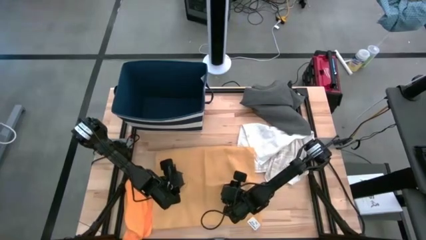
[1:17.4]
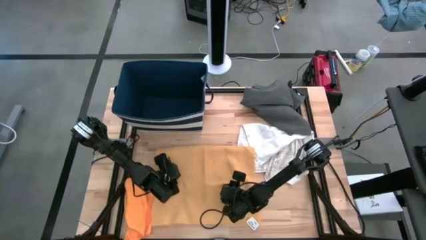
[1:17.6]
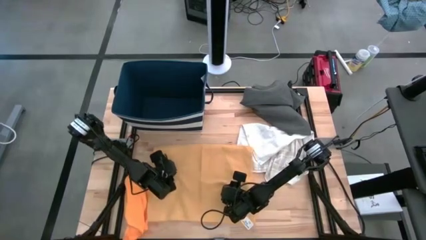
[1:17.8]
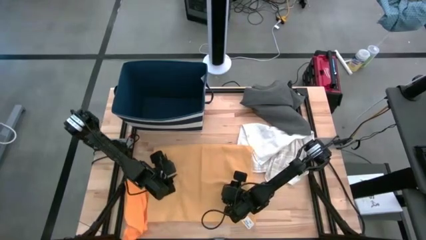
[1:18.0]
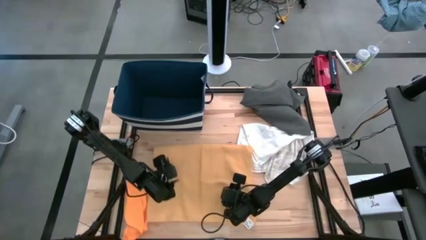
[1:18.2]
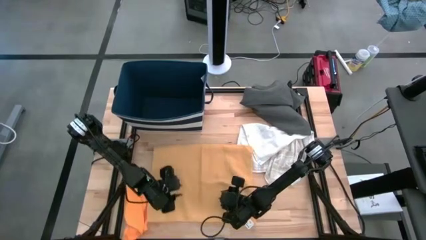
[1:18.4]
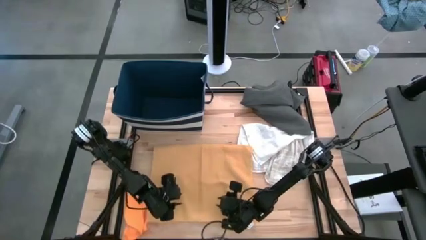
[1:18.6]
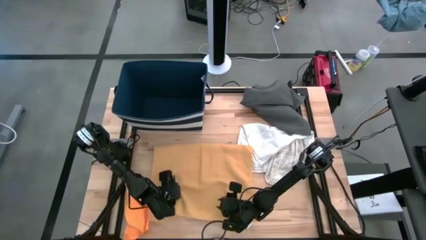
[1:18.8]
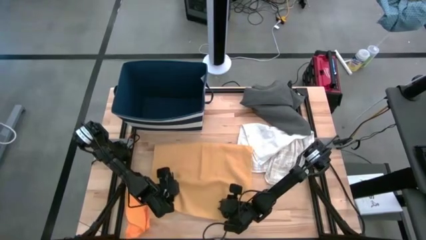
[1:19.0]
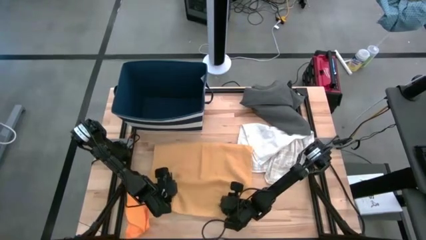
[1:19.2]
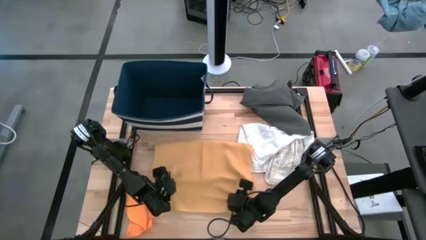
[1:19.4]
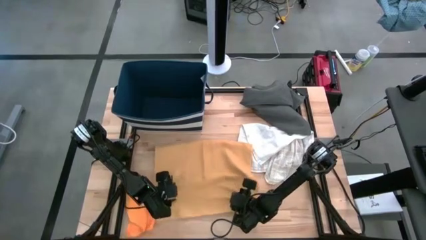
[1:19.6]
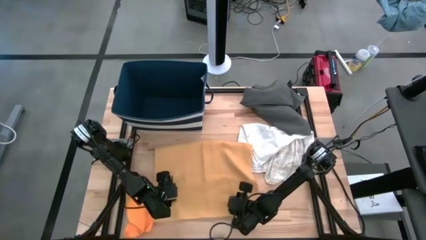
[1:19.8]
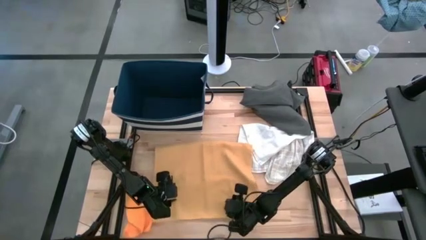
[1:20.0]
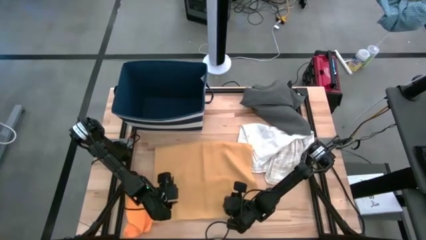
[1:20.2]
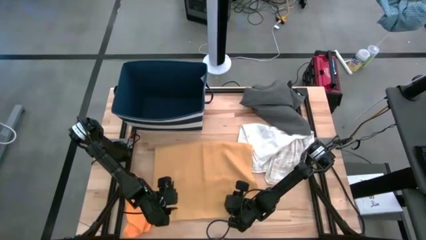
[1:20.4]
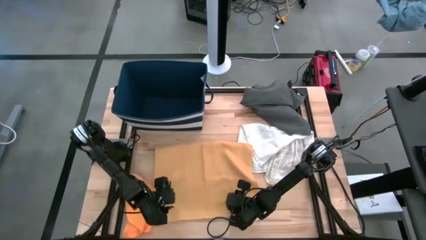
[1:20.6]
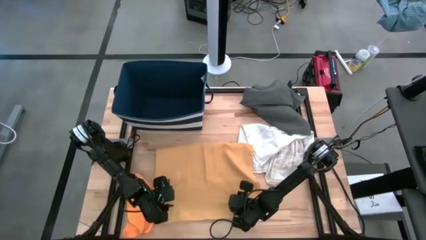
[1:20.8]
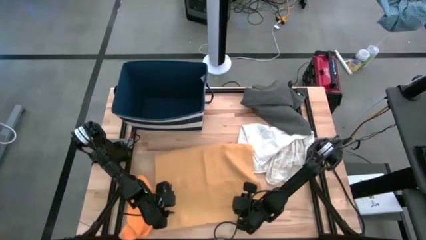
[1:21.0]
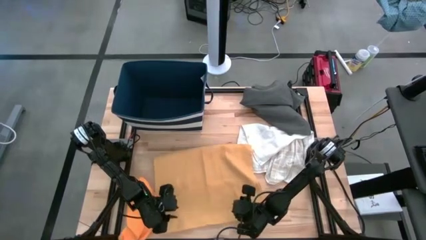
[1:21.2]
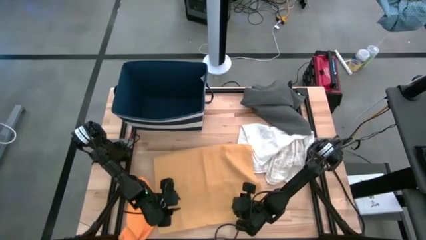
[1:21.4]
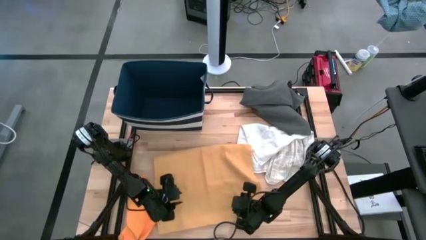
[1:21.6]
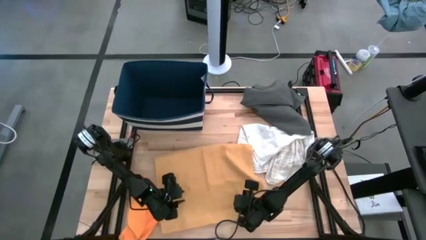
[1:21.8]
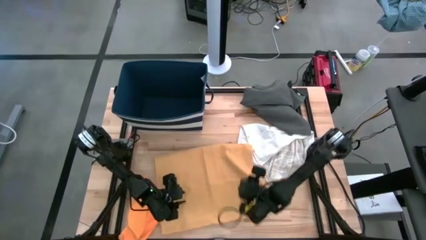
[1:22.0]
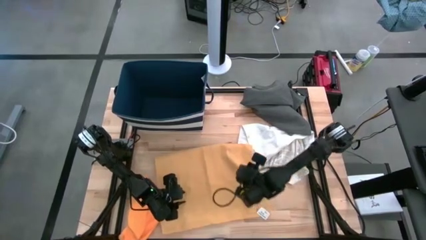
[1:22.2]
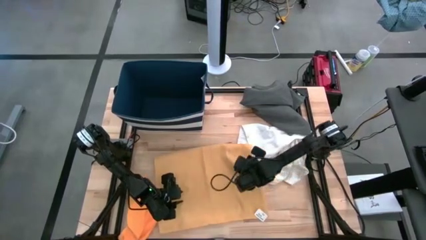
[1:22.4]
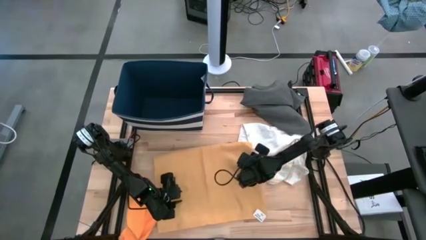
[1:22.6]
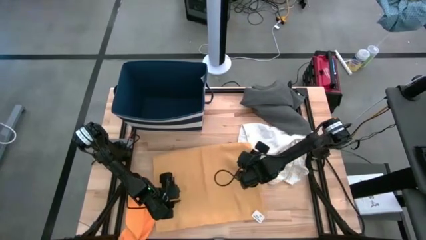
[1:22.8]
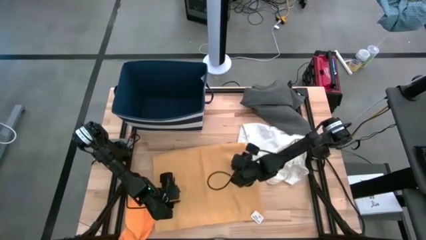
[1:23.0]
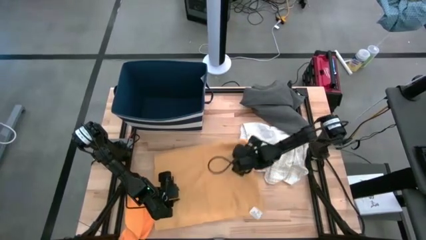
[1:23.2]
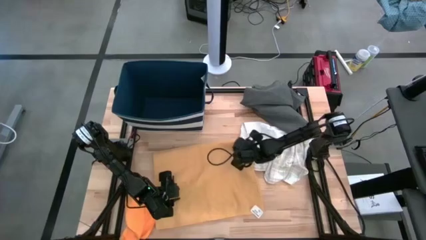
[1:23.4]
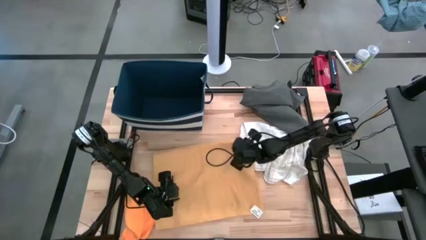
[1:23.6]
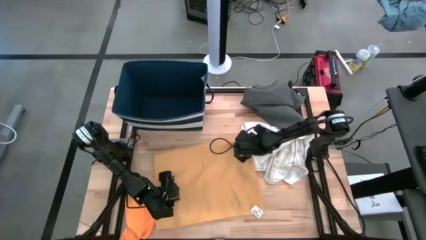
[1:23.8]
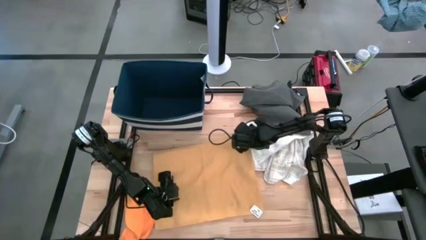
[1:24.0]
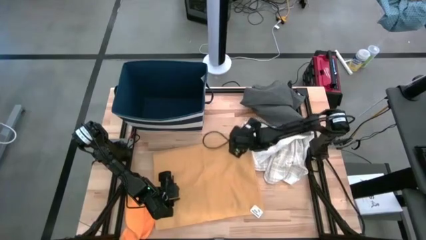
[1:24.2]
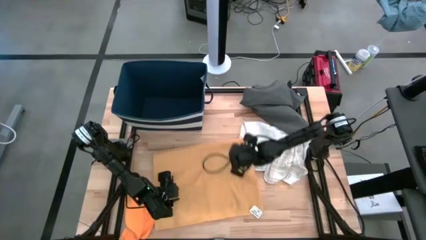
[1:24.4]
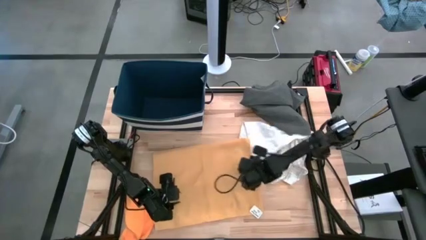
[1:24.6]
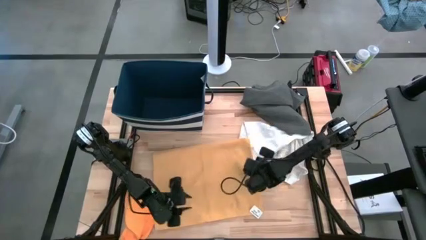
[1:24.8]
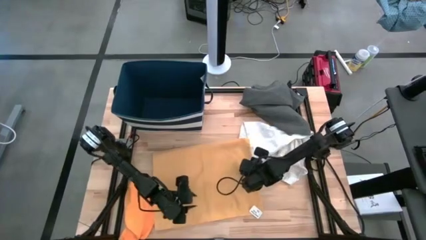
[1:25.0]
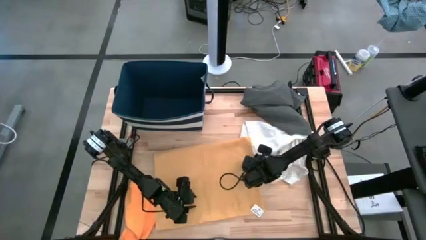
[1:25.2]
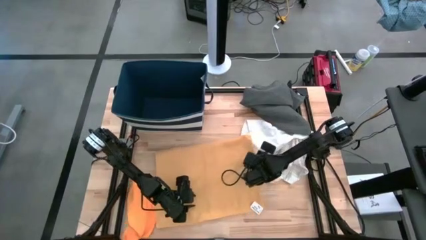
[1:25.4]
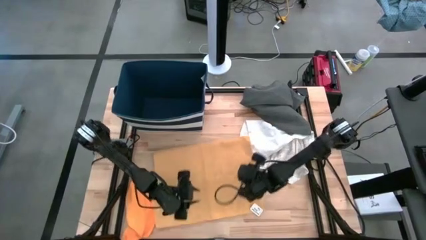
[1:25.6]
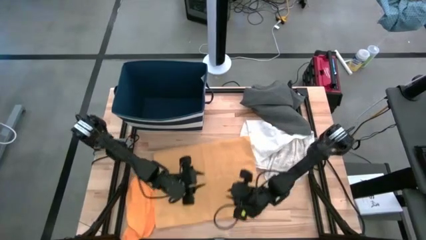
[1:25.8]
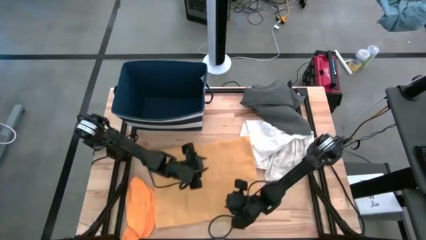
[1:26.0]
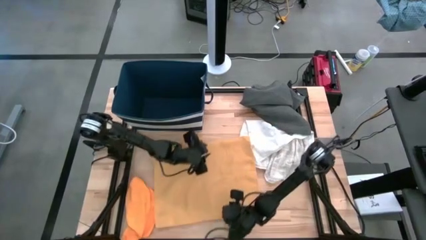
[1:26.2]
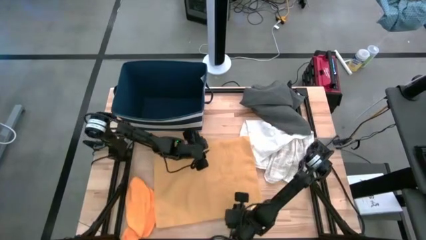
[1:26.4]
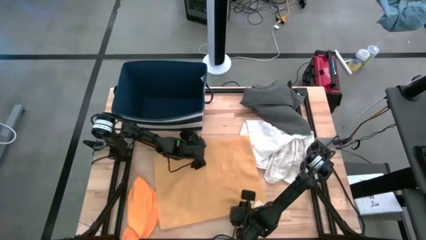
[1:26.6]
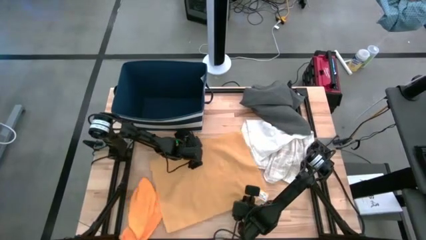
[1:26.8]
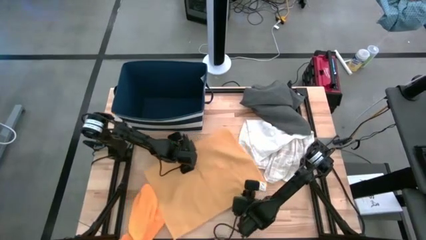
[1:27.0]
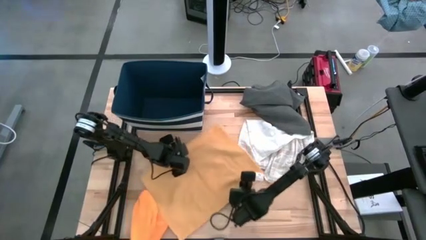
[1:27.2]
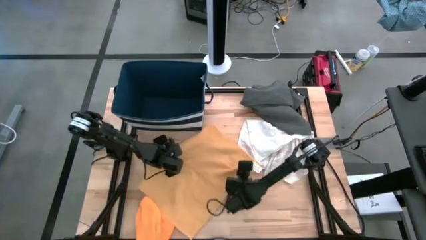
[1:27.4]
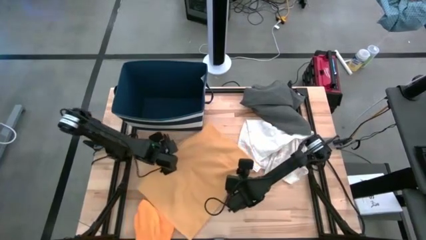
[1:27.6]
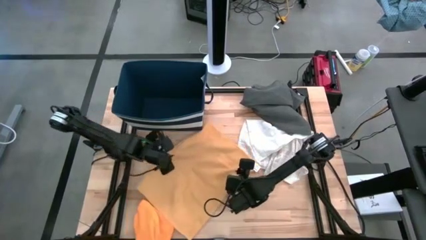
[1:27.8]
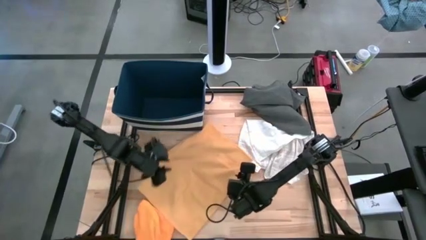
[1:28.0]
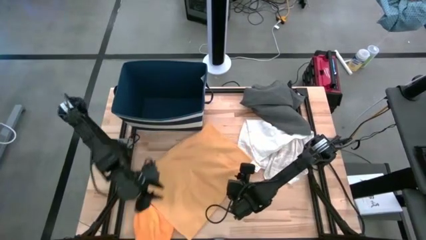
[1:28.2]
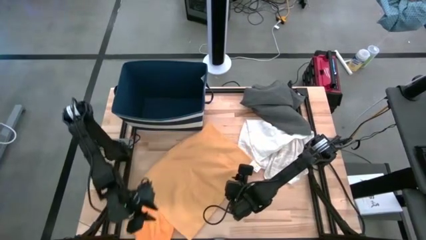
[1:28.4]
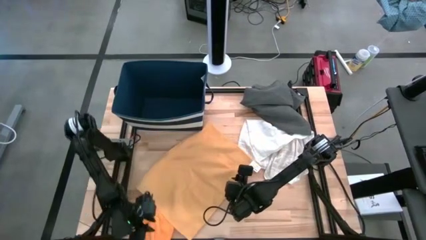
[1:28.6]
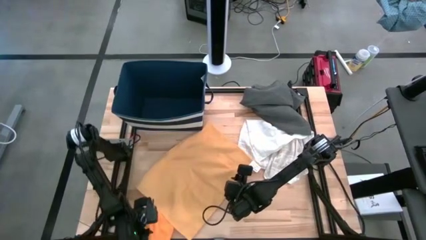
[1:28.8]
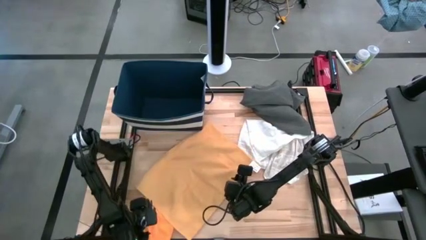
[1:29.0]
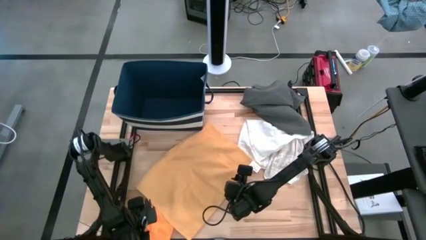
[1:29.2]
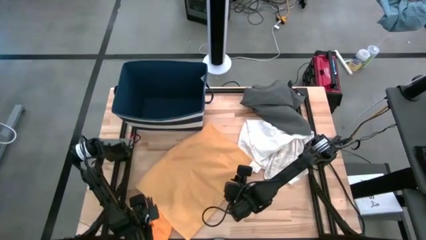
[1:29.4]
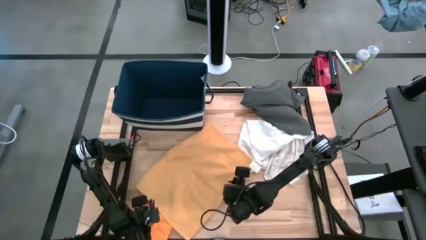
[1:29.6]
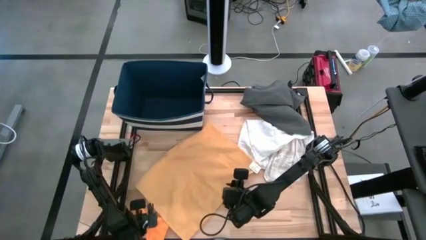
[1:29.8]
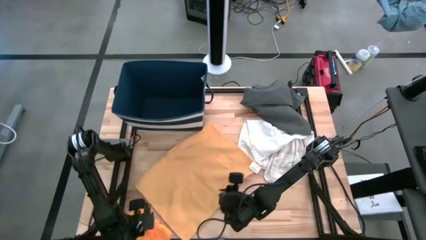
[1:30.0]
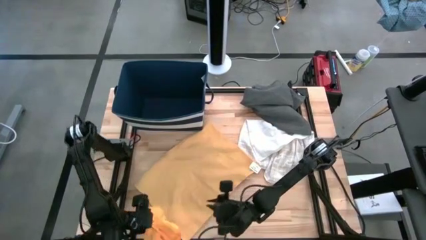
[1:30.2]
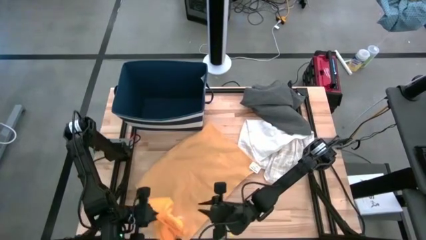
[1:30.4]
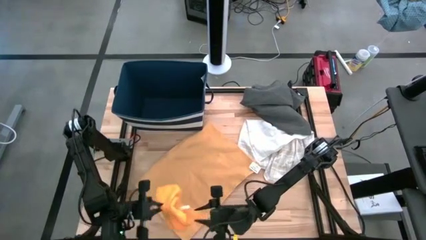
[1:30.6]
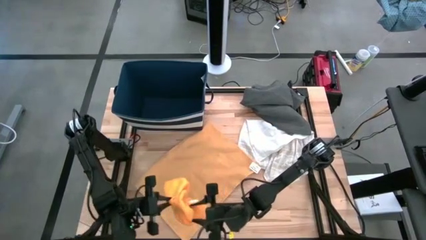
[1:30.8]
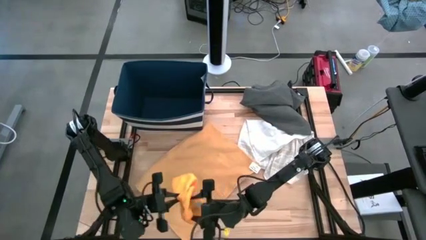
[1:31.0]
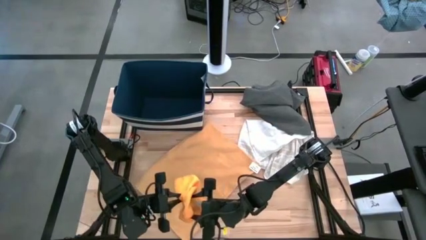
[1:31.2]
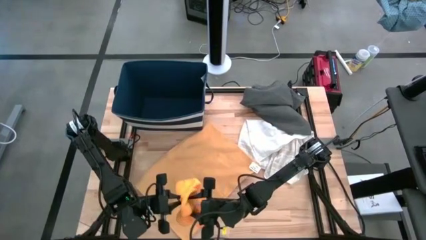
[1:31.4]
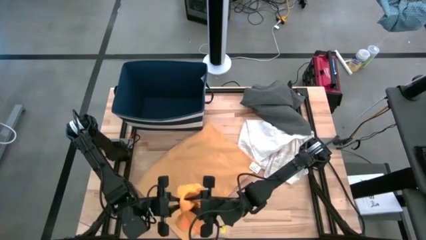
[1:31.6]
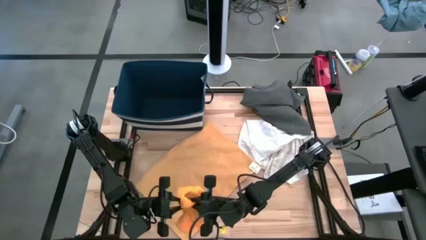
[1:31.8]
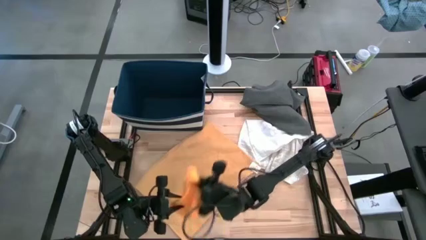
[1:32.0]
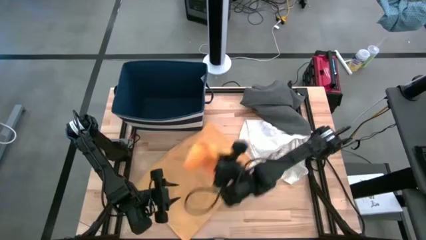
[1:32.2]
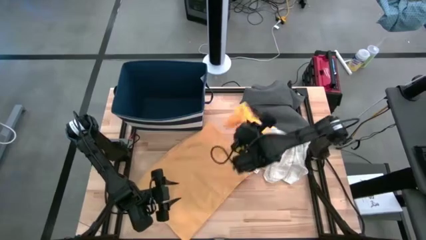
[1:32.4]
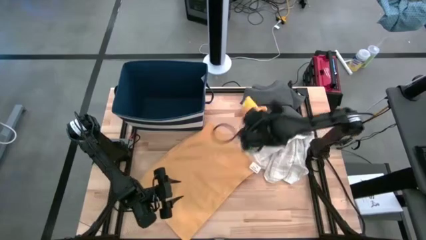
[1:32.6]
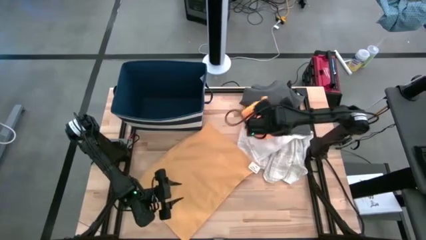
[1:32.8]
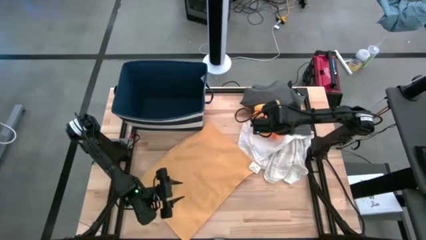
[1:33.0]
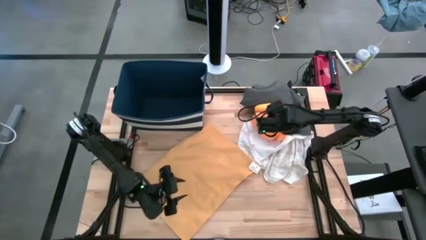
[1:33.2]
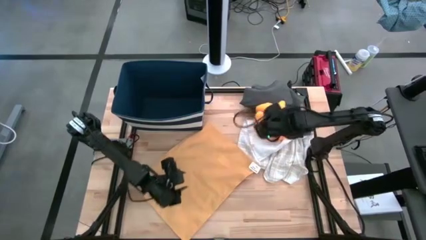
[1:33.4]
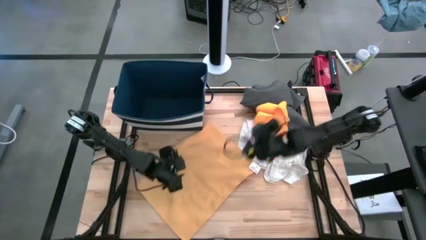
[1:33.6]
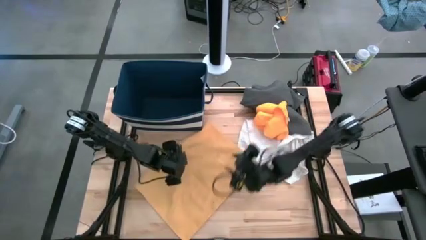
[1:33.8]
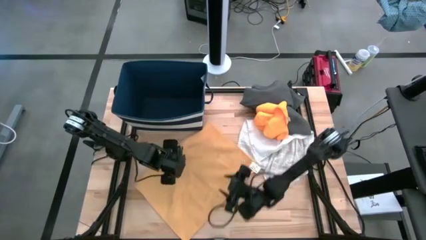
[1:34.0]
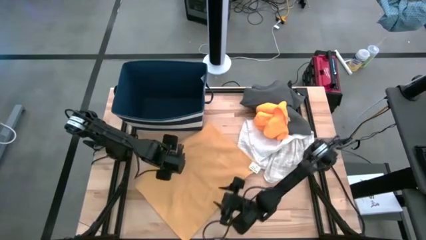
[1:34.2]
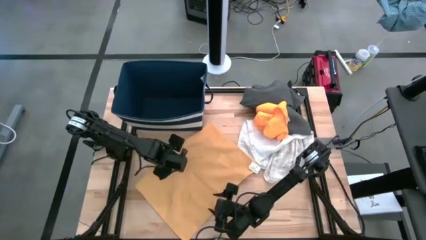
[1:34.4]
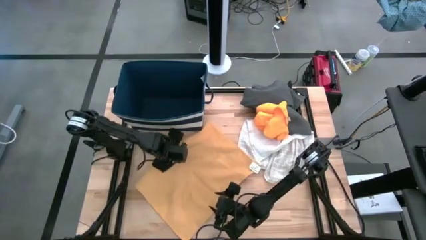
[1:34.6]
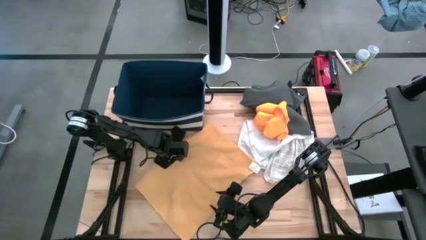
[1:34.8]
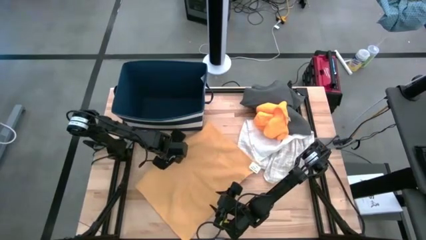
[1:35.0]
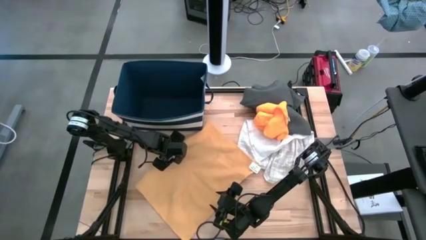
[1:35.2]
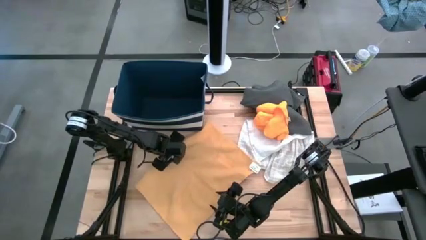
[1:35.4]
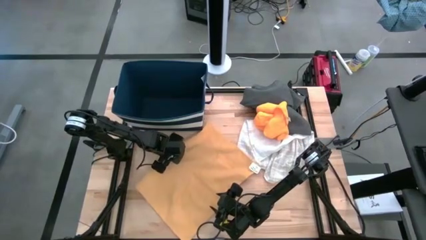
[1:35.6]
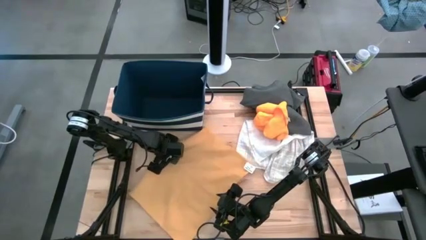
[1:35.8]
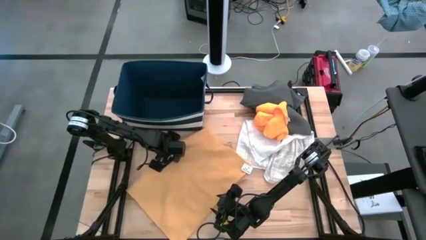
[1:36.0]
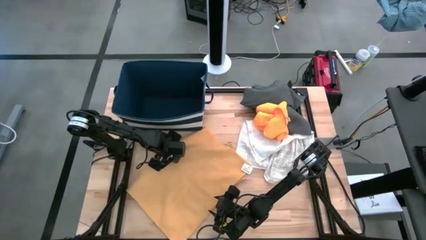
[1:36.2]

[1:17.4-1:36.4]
Task: Fold towel
Fold the yellow kitchen towel
